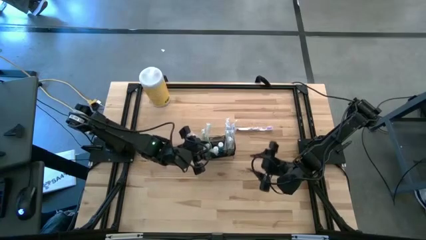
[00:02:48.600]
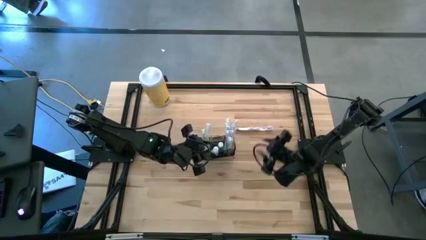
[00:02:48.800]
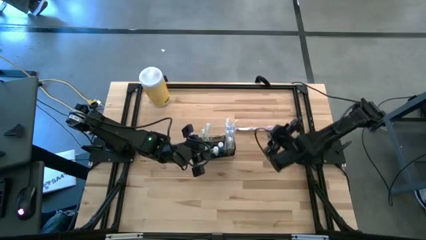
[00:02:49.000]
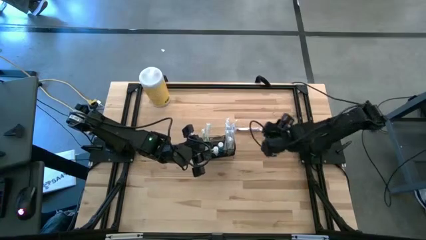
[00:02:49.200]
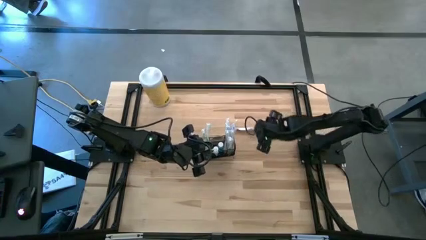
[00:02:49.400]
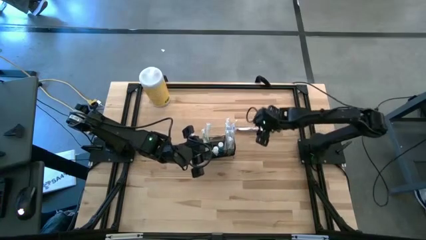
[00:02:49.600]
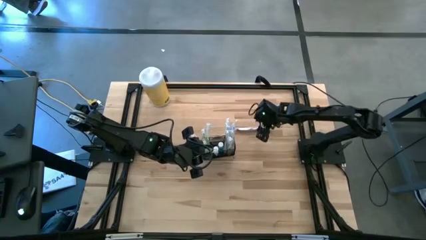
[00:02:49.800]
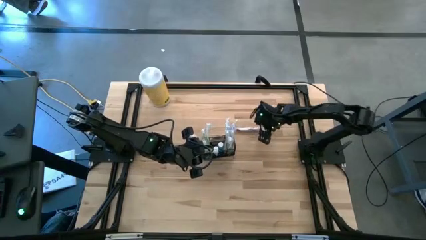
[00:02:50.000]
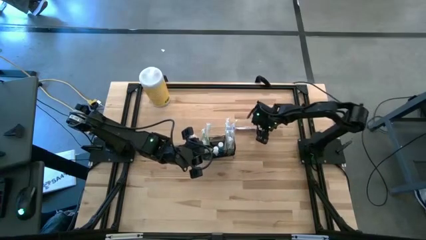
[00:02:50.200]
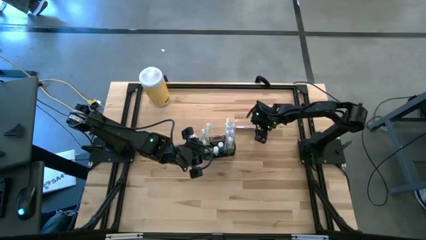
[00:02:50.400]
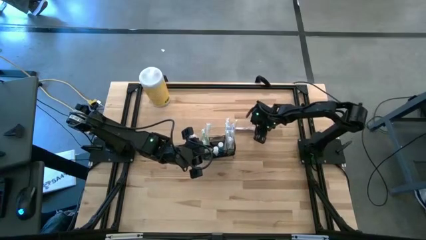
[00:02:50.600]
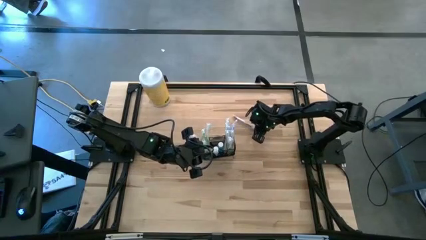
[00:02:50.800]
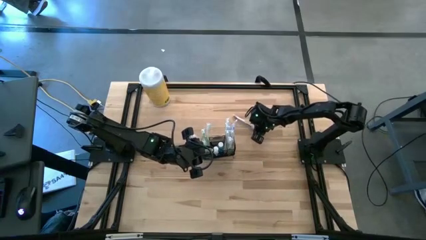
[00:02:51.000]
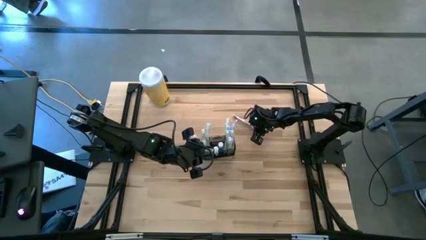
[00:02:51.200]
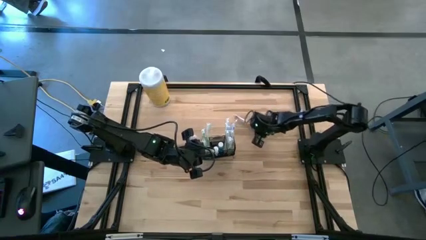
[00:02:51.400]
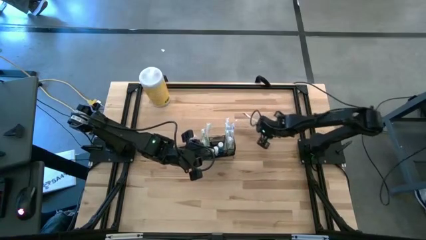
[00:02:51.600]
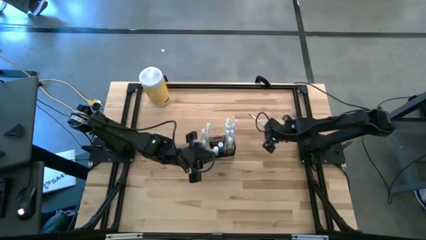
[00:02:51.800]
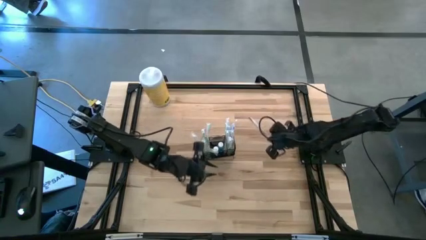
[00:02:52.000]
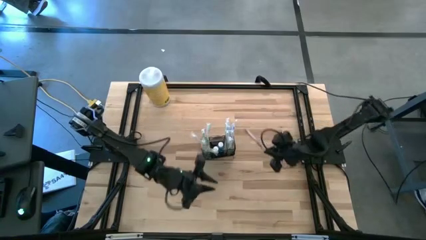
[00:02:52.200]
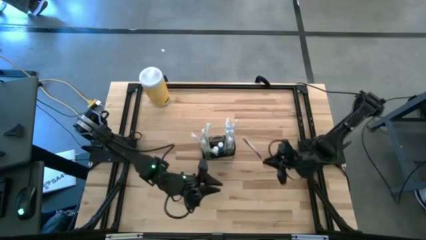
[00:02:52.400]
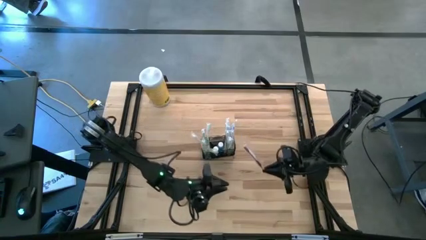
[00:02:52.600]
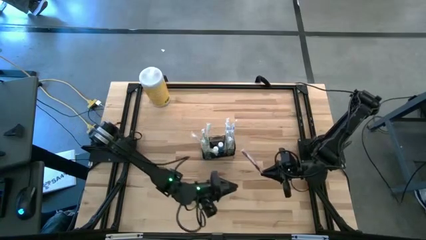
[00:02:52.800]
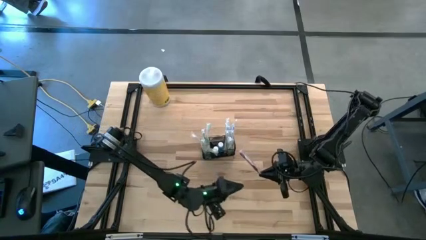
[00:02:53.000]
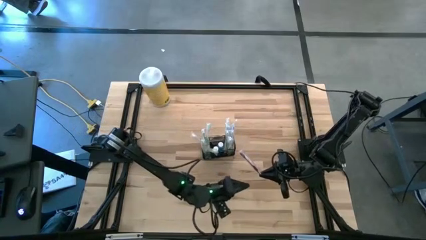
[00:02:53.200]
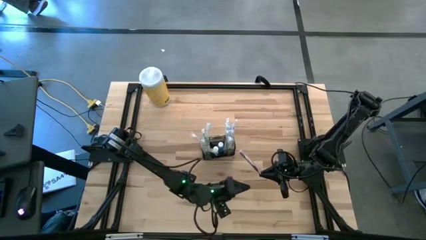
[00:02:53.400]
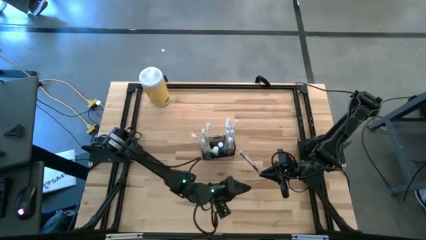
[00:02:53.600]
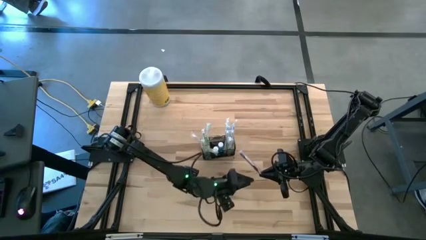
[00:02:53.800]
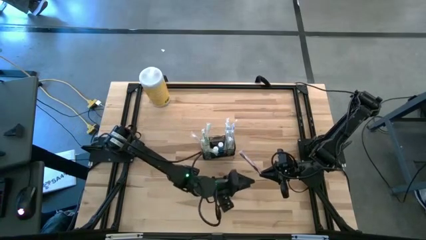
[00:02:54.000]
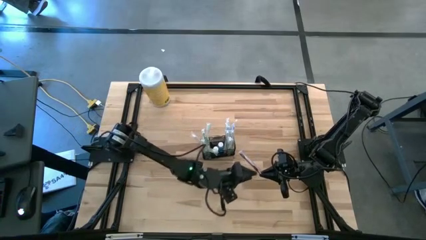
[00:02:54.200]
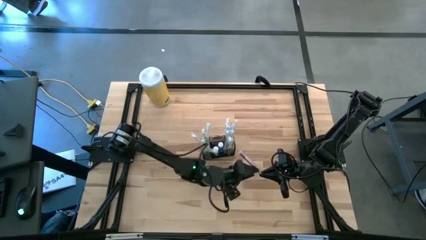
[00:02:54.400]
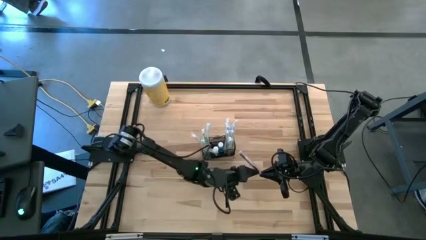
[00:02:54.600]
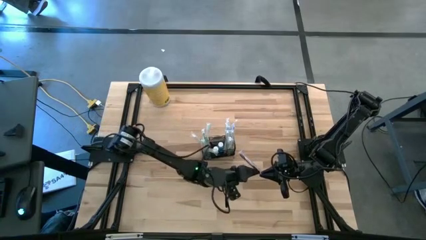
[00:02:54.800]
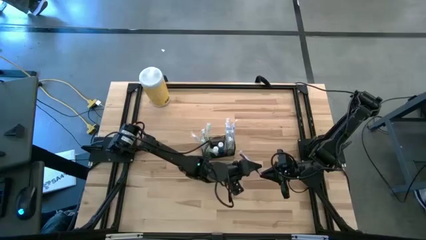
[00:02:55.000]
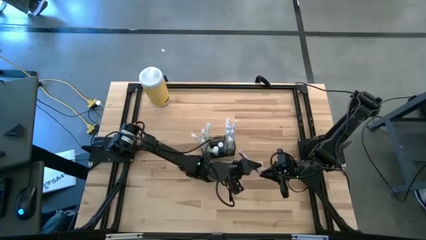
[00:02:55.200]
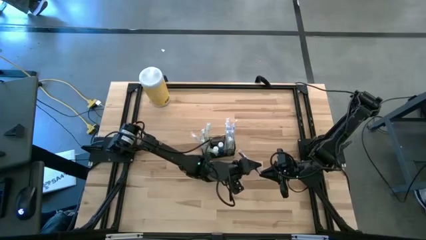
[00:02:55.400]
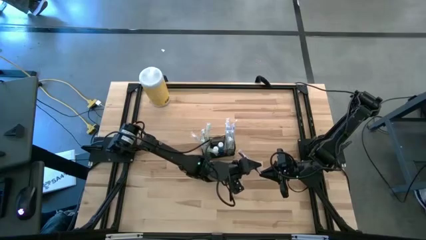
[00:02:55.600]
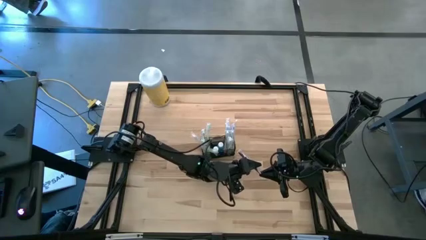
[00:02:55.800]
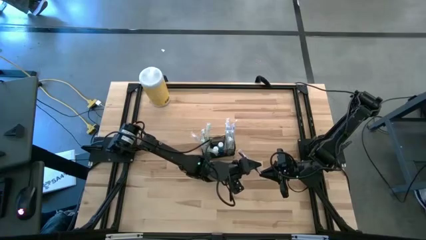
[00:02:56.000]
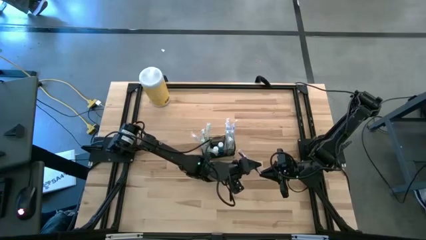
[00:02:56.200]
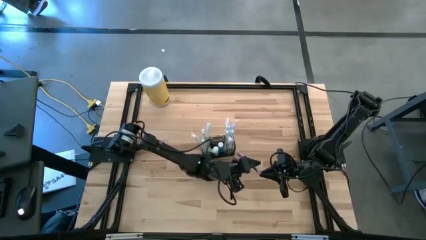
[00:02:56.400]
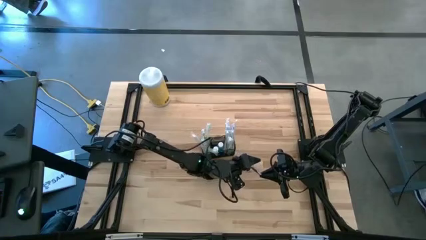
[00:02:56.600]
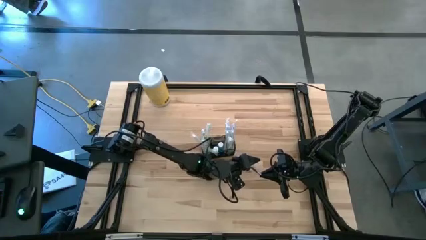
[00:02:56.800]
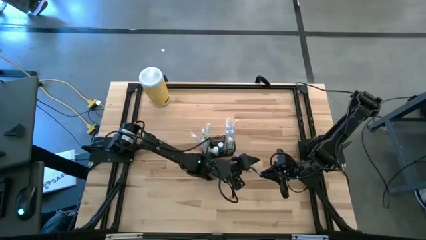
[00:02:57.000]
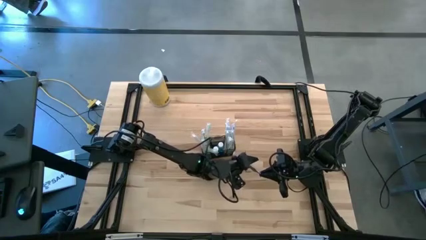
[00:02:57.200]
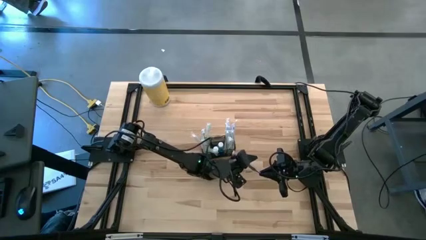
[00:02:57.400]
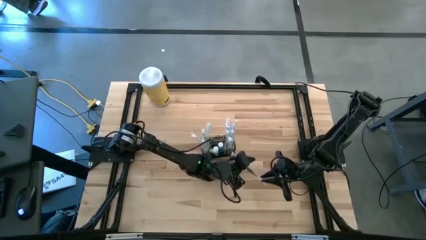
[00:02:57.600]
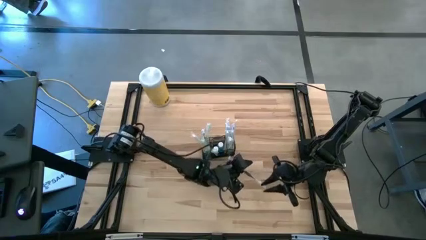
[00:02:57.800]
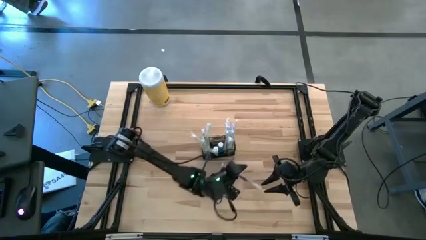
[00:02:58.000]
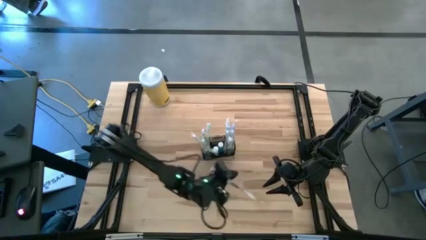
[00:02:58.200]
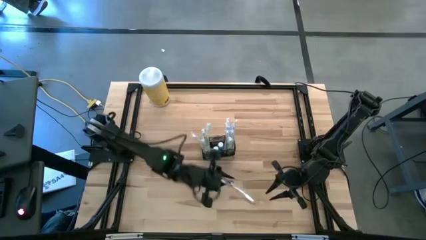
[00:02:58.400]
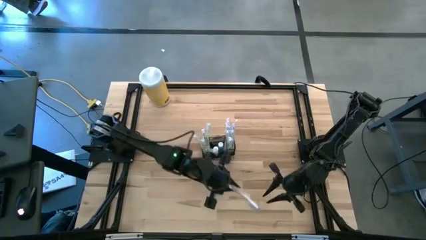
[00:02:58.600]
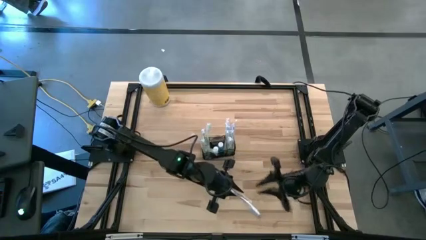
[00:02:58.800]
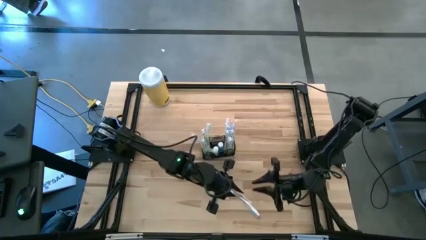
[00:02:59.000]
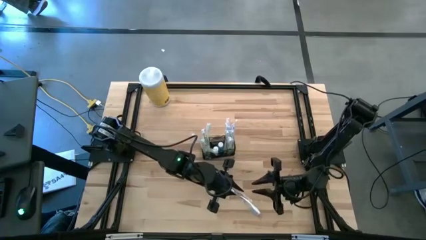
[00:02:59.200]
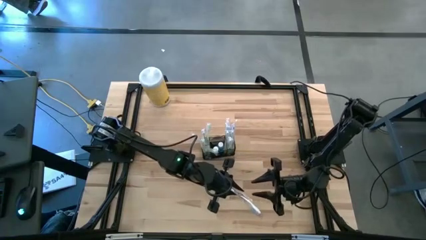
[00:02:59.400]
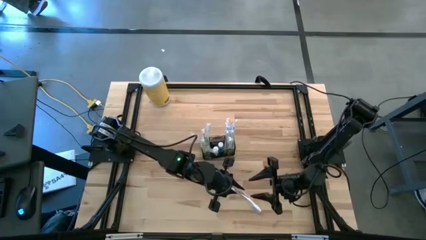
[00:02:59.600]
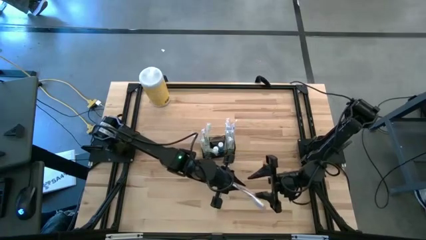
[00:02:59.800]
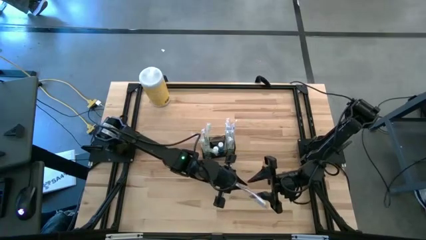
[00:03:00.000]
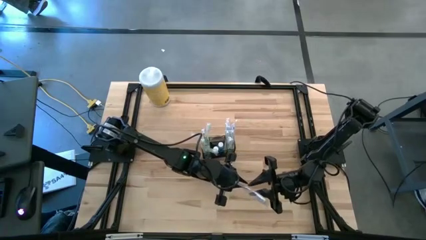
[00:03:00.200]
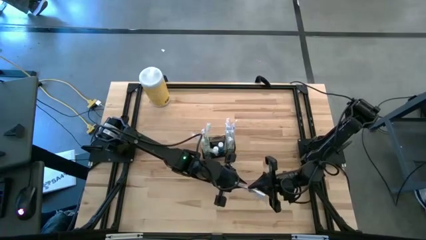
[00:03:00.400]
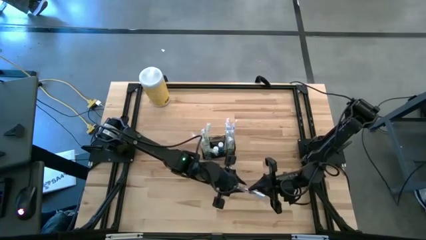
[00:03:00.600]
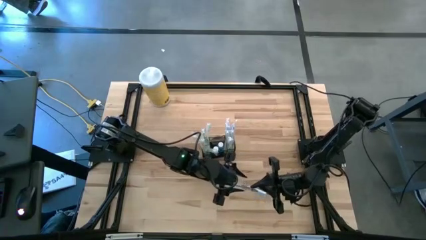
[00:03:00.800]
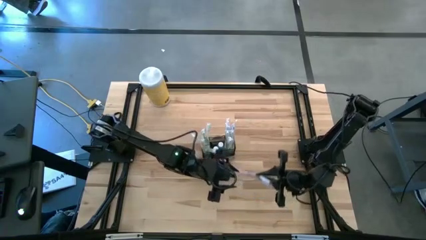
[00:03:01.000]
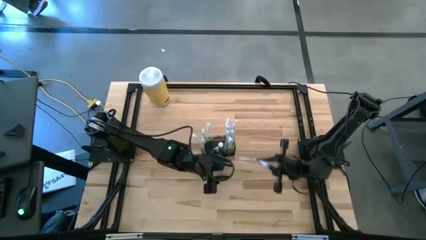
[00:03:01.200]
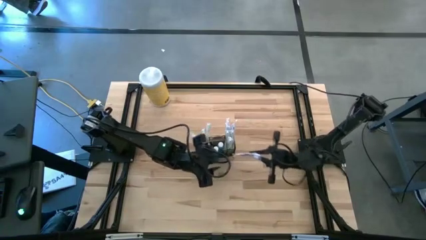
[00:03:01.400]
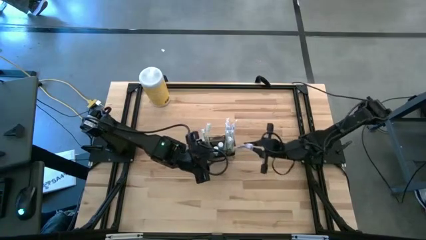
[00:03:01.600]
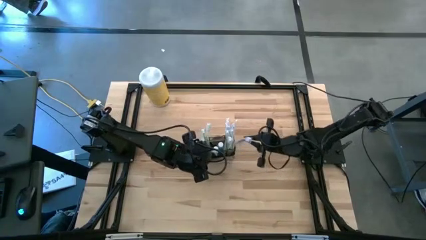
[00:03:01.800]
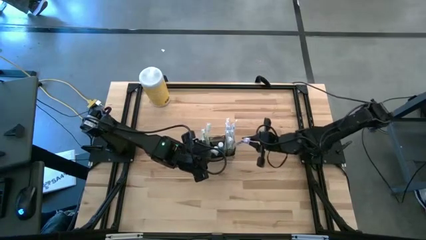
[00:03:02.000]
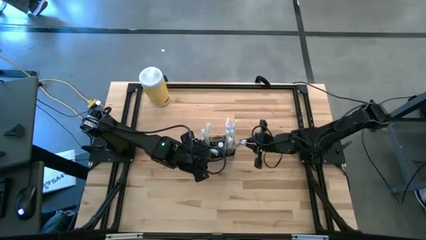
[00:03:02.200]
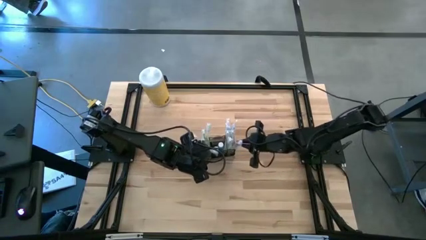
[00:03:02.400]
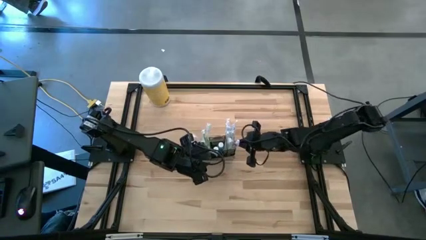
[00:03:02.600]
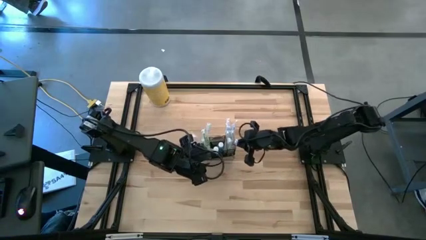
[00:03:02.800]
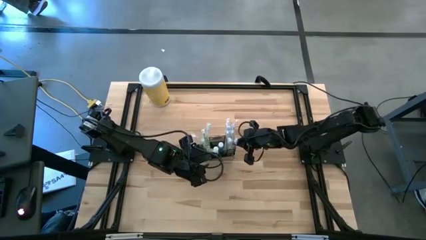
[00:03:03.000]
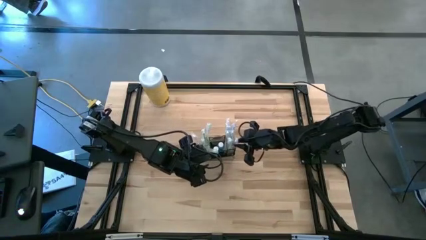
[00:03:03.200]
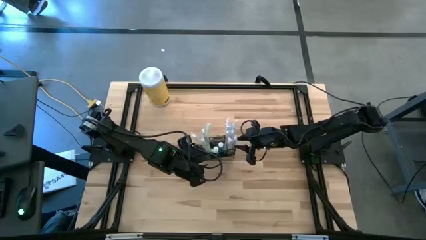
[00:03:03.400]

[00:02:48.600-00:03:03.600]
Task: Pick & Place toothbrushing station
Put the violet toothbrush into the wire organizer

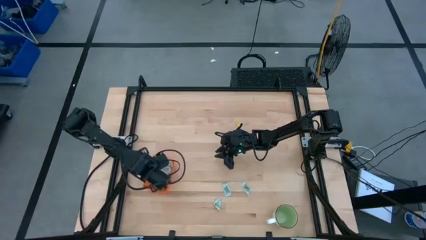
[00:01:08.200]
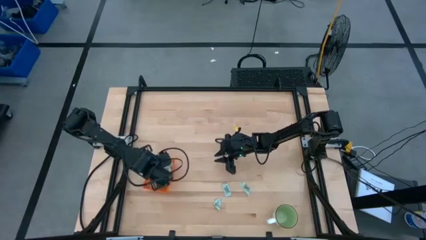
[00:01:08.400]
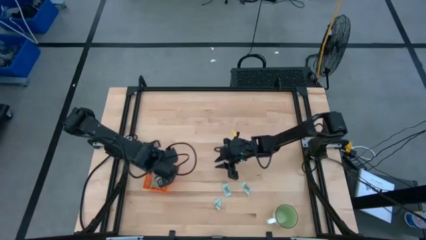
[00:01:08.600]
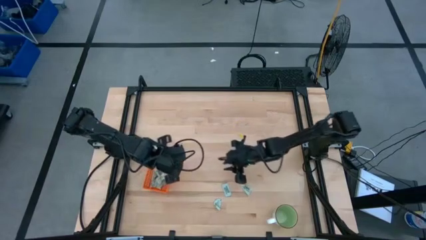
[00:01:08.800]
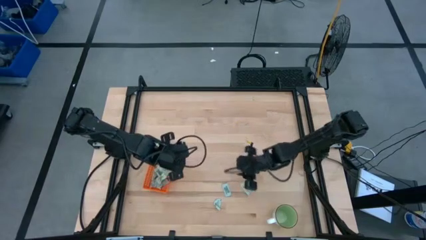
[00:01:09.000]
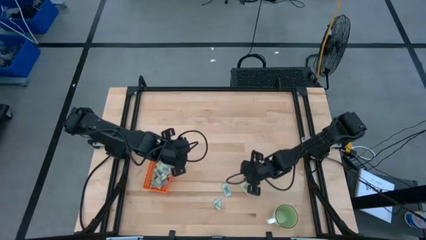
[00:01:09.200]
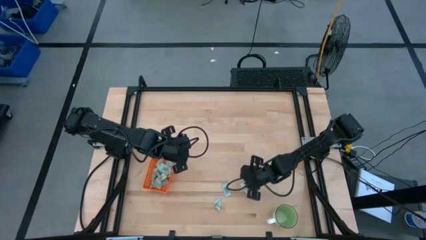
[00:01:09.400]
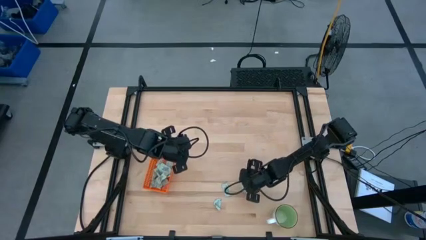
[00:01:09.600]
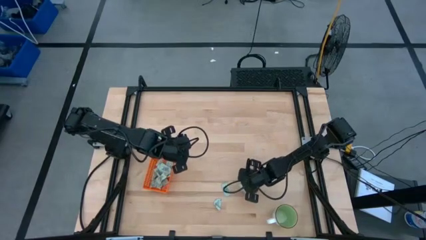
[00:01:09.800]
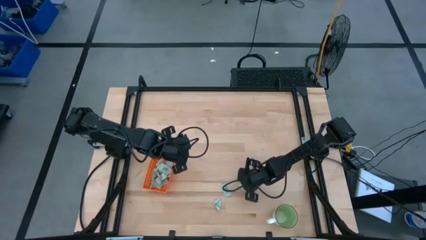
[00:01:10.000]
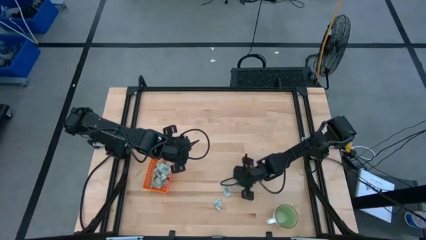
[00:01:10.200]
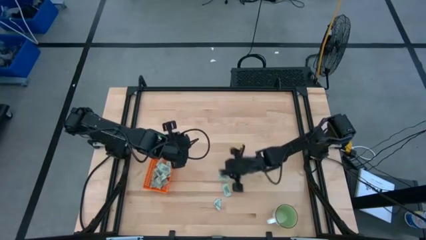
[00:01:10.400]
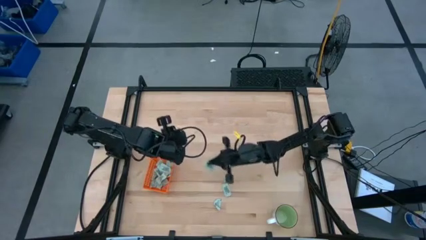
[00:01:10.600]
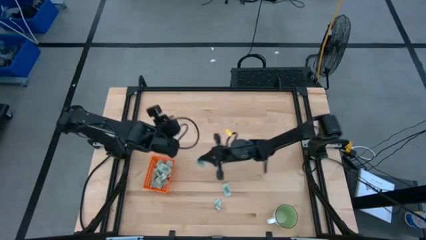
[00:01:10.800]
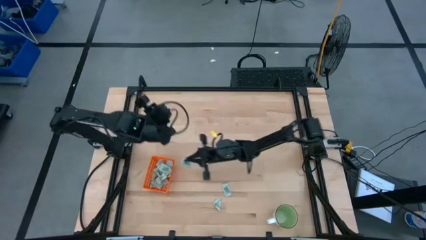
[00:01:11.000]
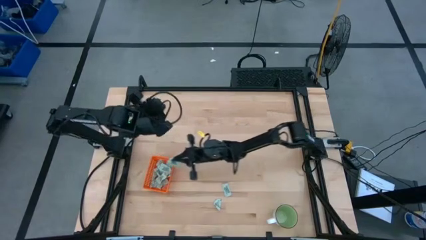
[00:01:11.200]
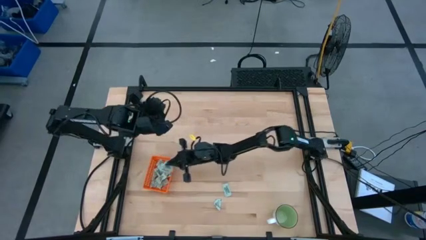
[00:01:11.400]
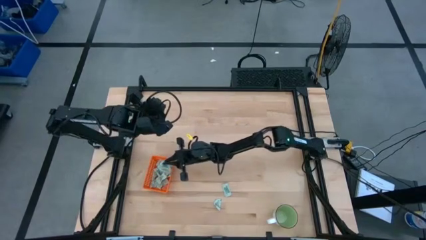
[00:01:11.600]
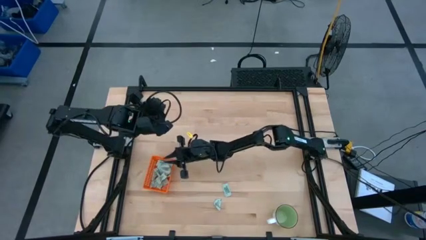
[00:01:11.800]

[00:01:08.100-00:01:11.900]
Task: Pick and place Stevia / Truvia into bins
Put the white stevia packet into the orange bin
